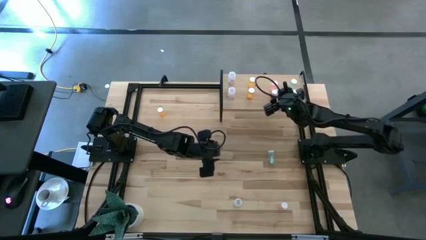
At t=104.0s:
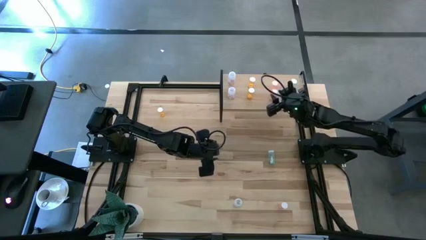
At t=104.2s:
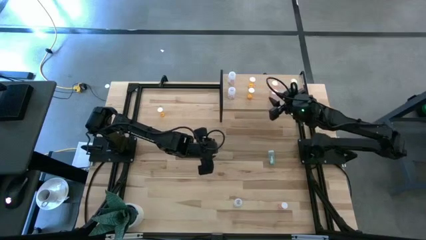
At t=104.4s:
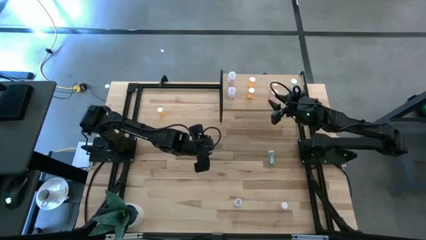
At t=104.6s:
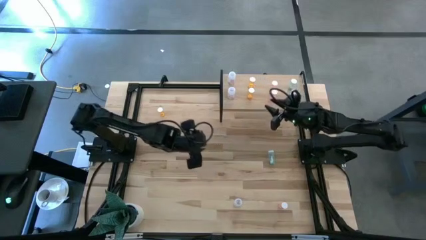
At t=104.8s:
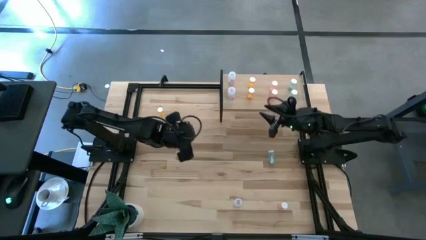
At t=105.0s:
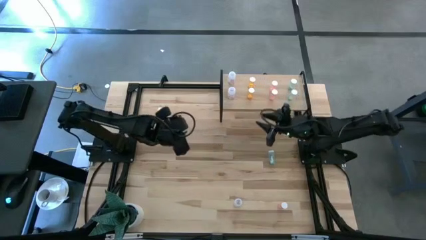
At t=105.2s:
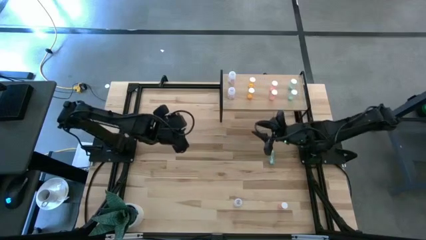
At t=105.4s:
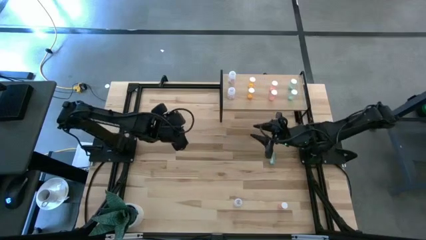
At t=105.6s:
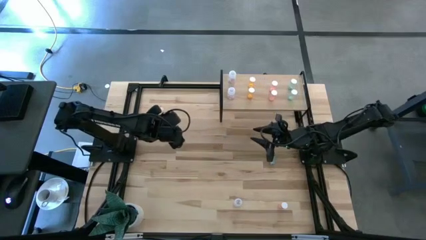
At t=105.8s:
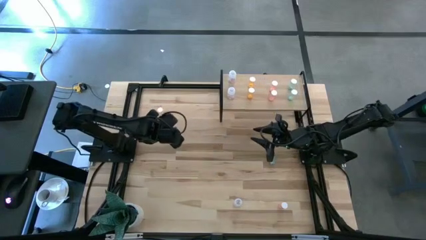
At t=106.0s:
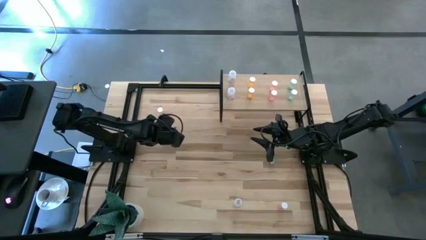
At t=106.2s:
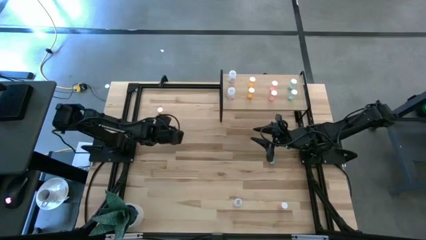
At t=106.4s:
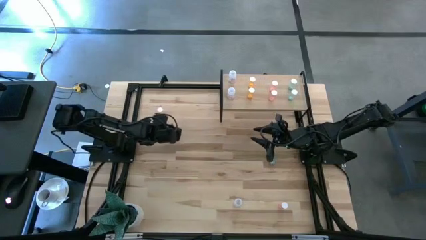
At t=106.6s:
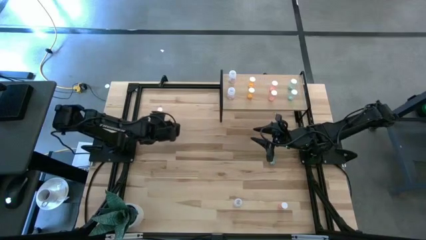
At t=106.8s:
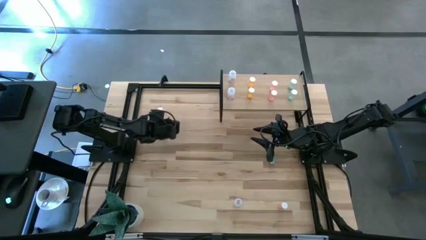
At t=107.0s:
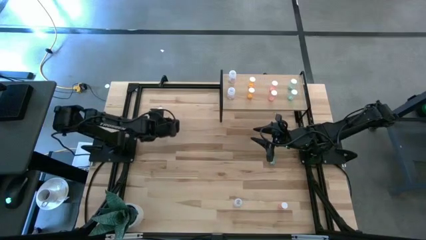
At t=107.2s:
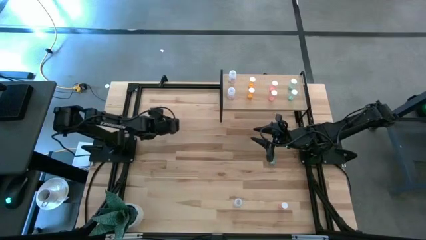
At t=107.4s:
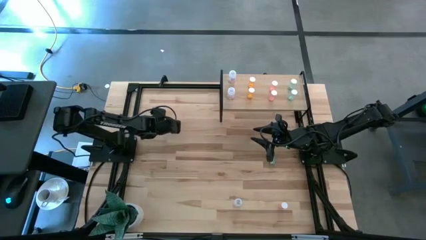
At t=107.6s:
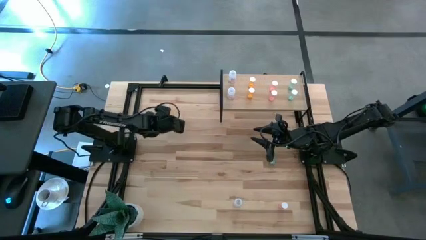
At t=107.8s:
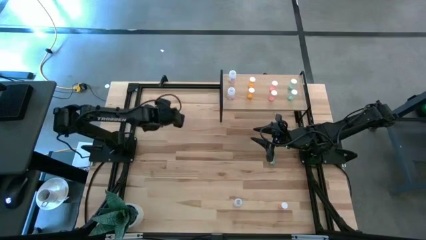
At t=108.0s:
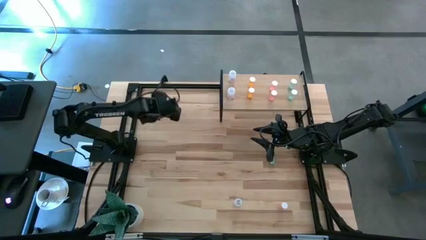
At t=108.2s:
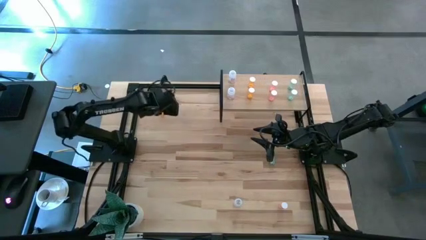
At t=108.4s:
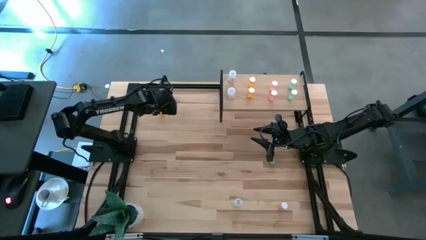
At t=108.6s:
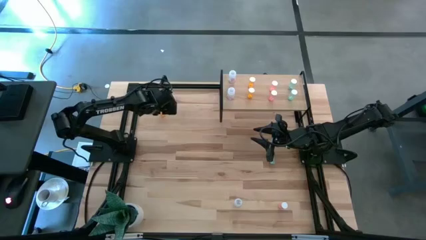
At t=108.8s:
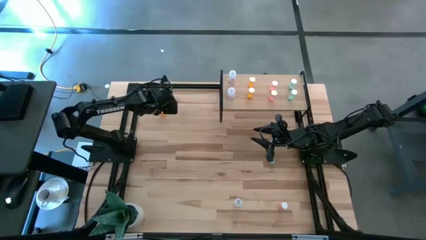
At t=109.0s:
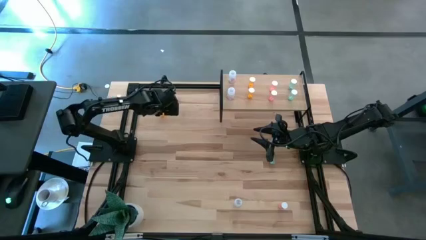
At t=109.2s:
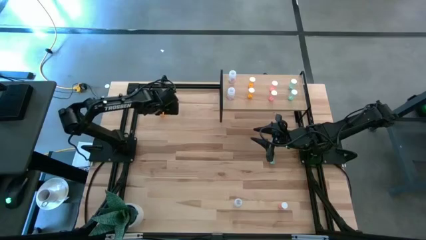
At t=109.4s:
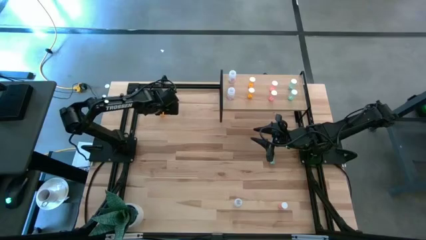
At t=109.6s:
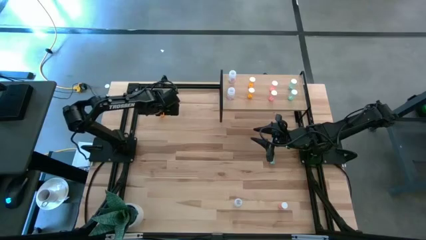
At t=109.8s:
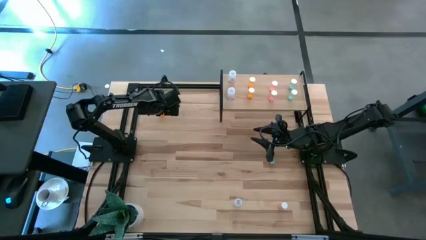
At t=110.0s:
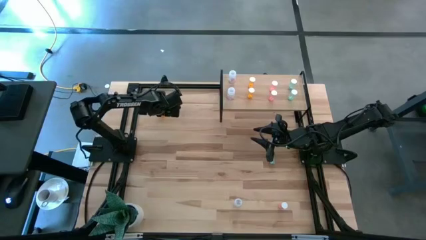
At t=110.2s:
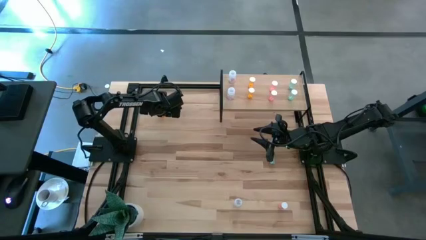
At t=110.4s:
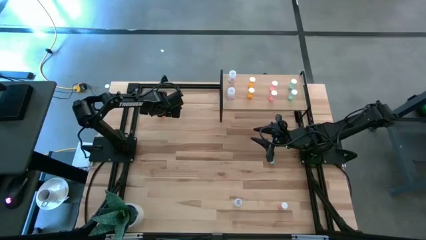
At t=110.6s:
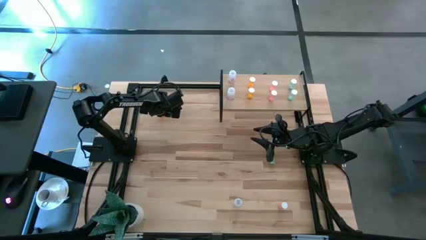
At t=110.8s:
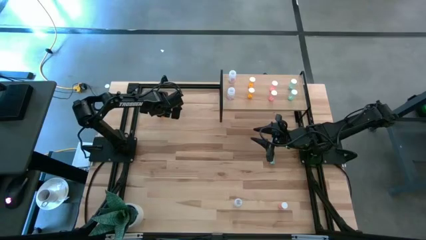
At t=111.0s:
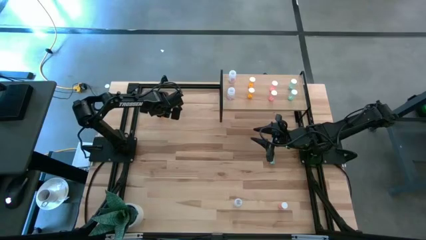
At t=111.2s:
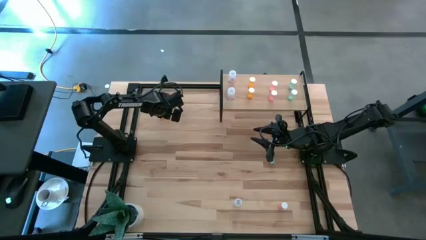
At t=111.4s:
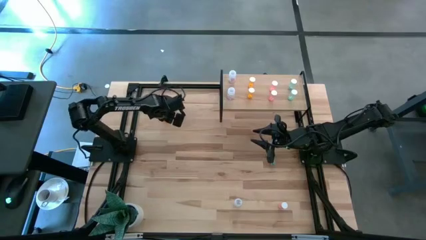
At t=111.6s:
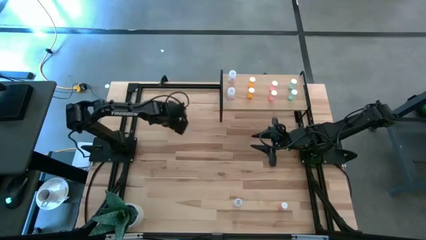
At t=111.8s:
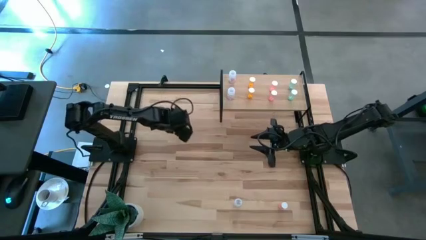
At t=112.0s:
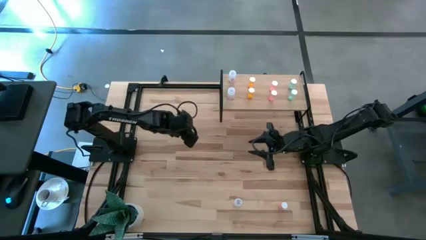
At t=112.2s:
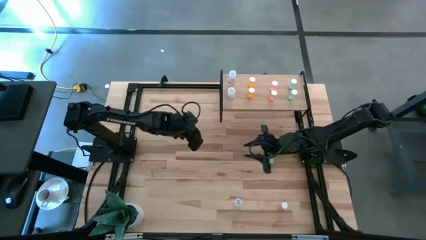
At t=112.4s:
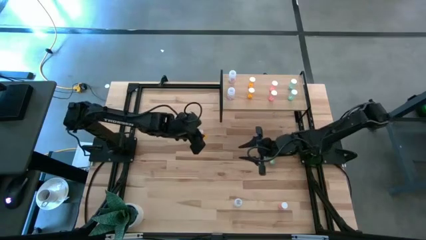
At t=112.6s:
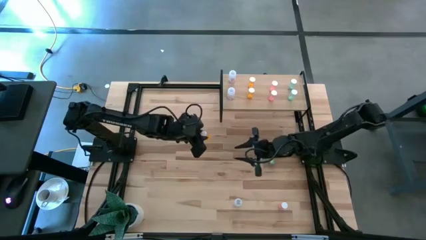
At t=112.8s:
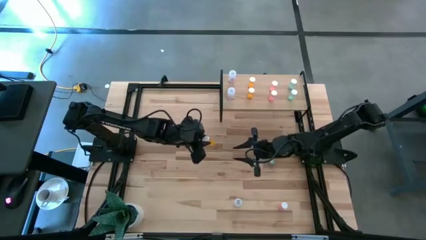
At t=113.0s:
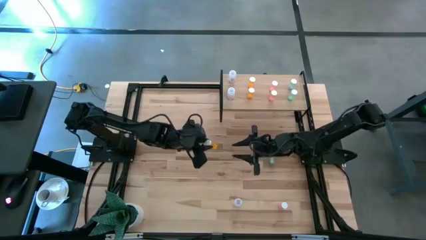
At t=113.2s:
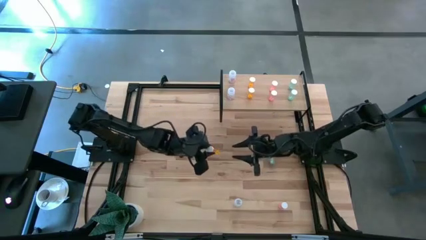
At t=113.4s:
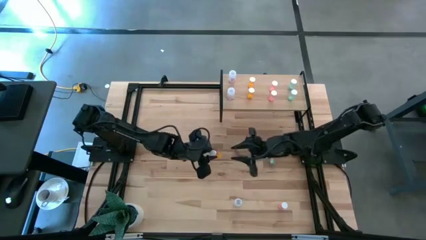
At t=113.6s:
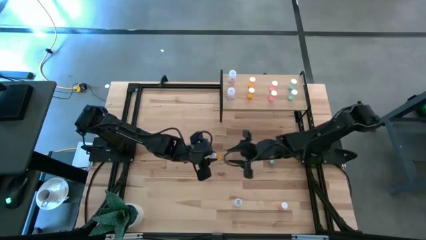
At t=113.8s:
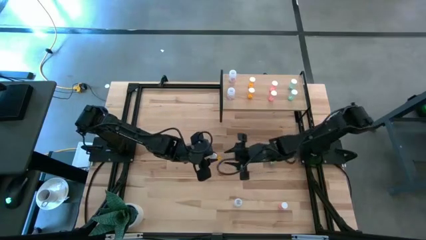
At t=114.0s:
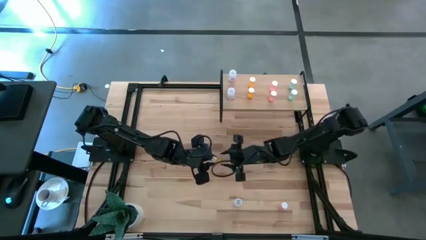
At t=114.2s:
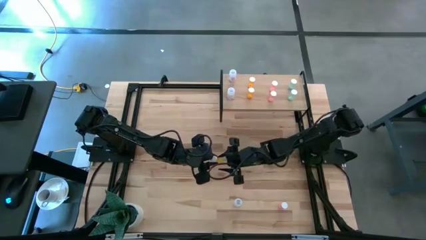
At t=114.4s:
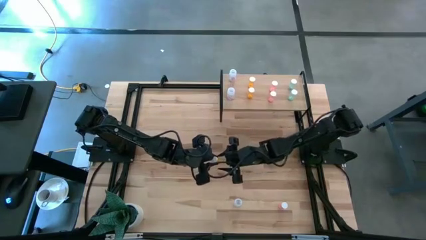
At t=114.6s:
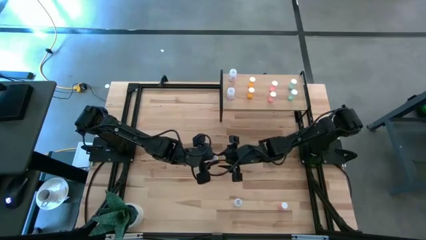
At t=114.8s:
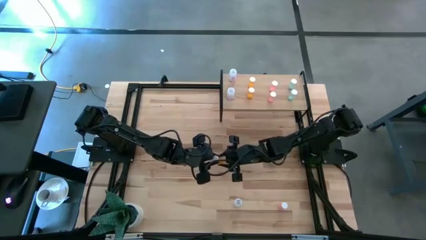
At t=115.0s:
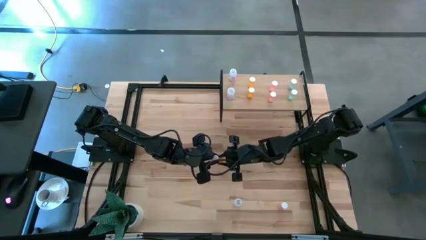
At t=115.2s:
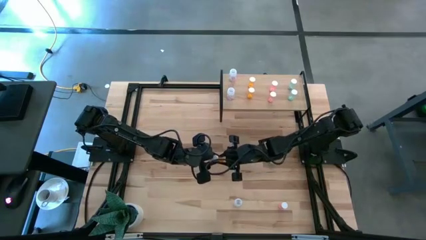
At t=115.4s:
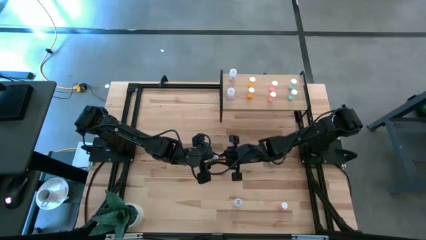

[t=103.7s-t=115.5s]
Task: Pick and place medicine bottles onto shelf by color
Put the orange pill bottle on the shelf aligned with the other orange pill bottle
